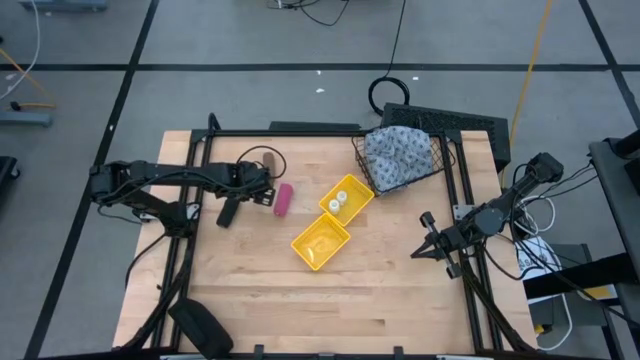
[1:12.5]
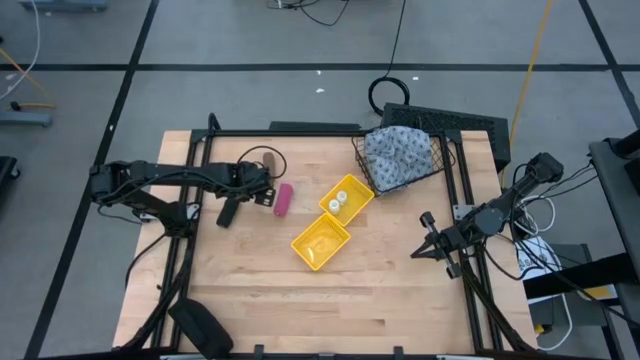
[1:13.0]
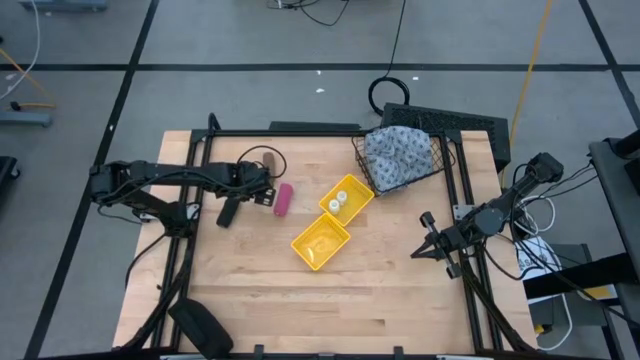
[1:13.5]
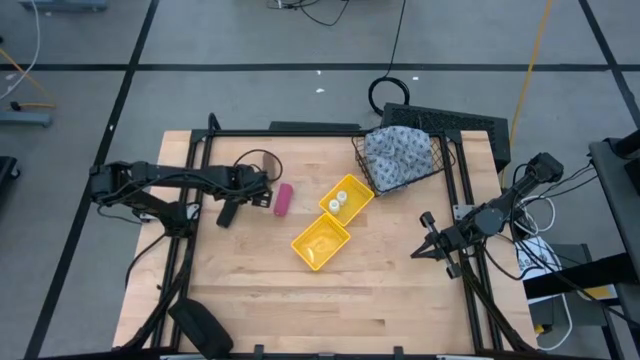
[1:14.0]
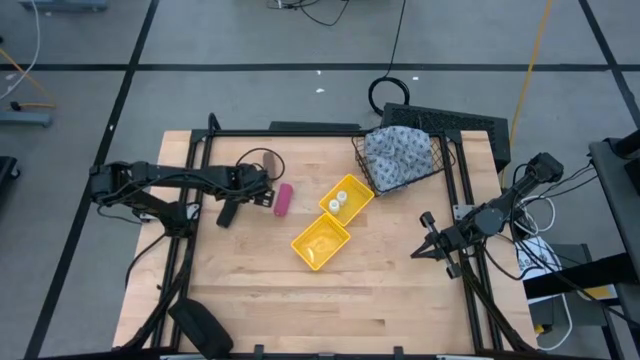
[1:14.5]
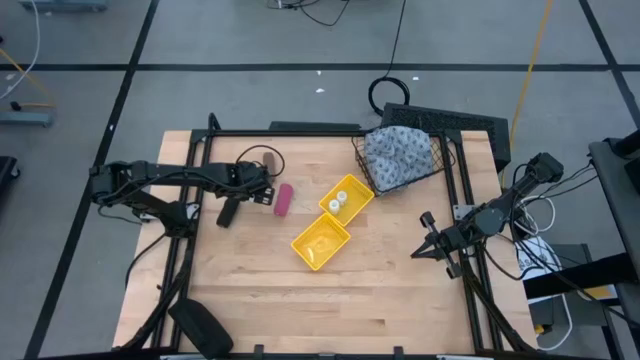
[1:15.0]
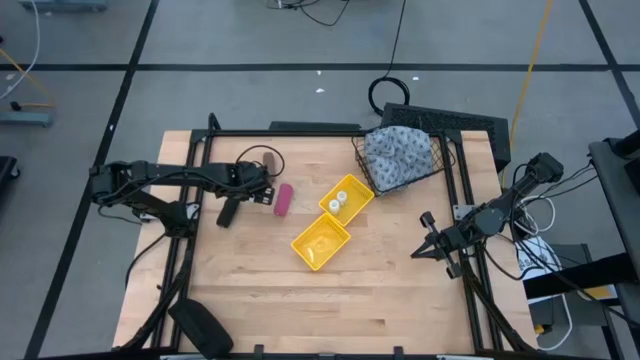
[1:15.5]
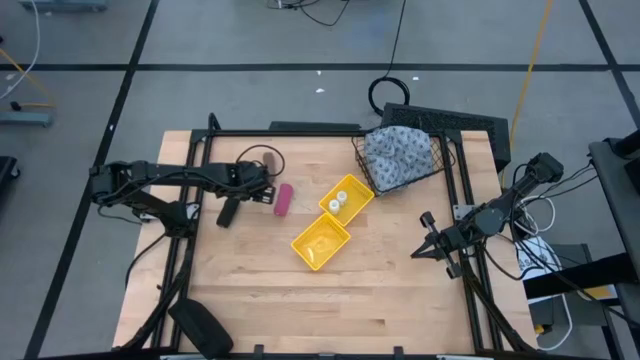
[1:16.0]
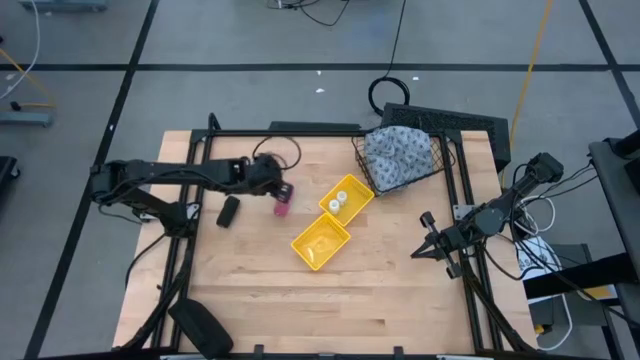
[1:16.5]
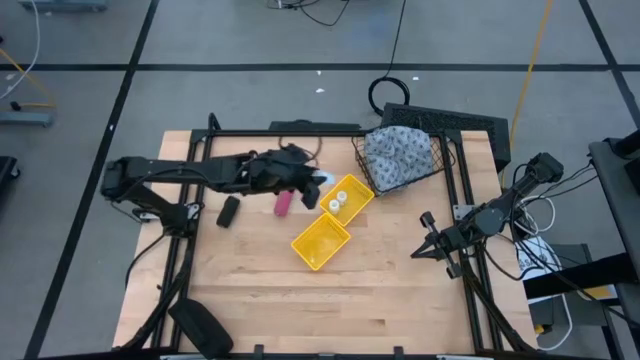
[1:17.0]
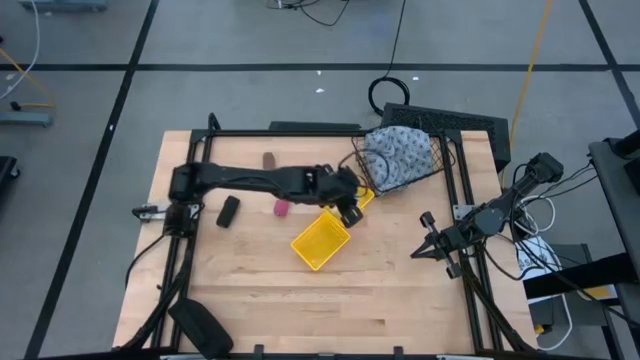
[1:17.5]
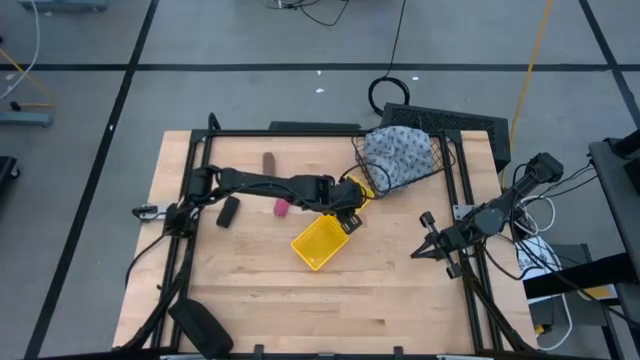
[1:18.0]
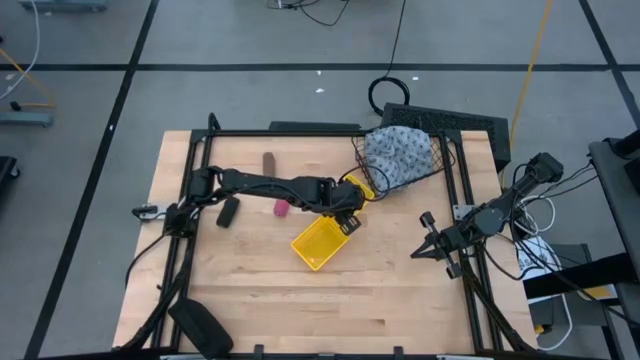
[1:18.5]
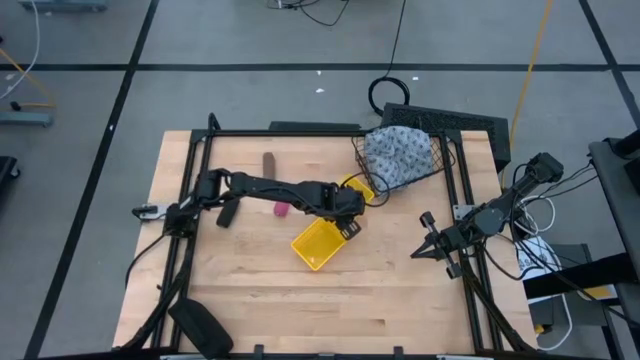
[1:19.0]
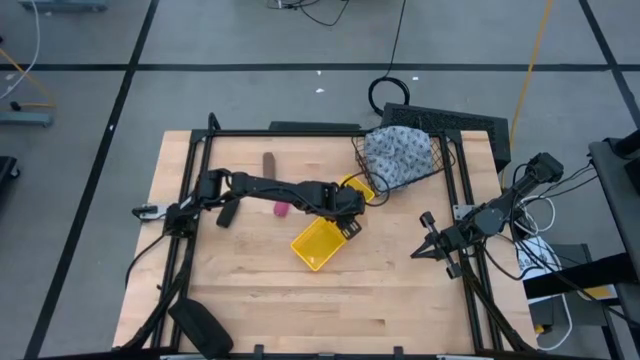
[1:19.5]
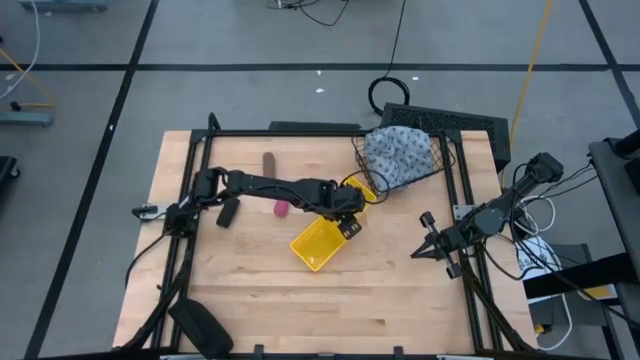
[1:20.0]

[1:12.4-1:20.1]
Task: Pick & place medical supplies in basket/bin
Put the white pill bottle into the top yellow basket

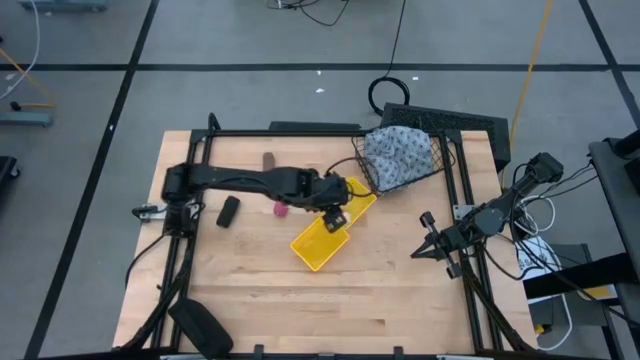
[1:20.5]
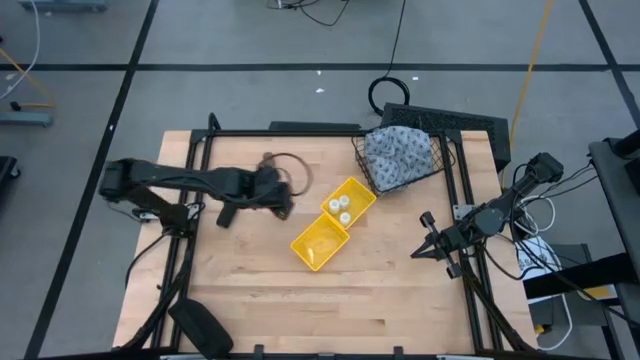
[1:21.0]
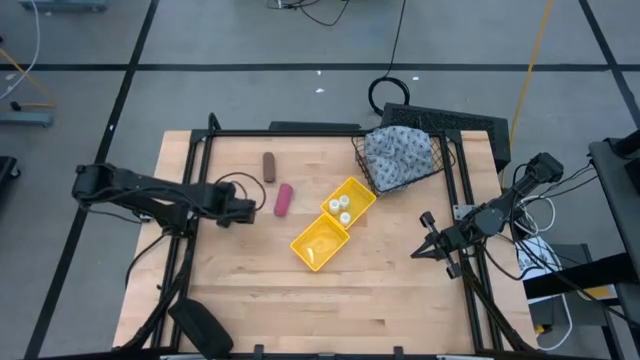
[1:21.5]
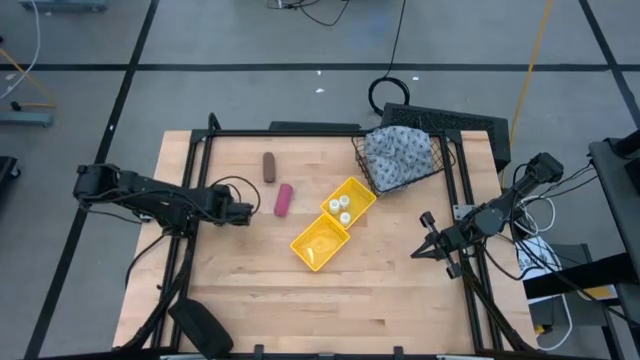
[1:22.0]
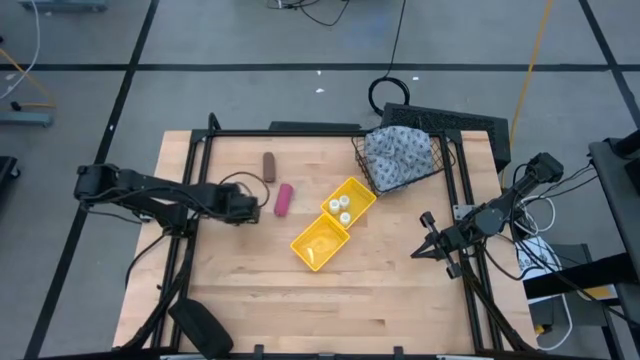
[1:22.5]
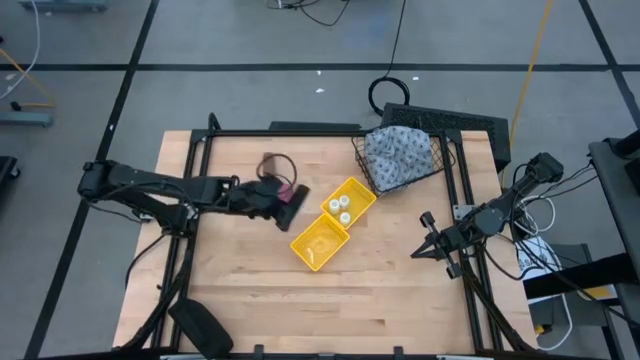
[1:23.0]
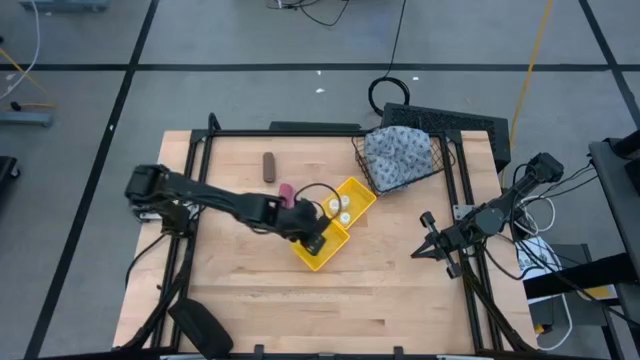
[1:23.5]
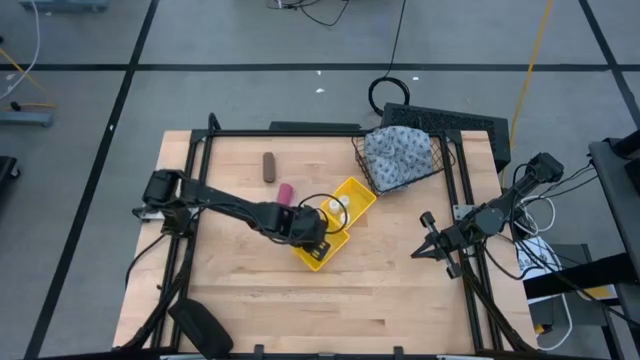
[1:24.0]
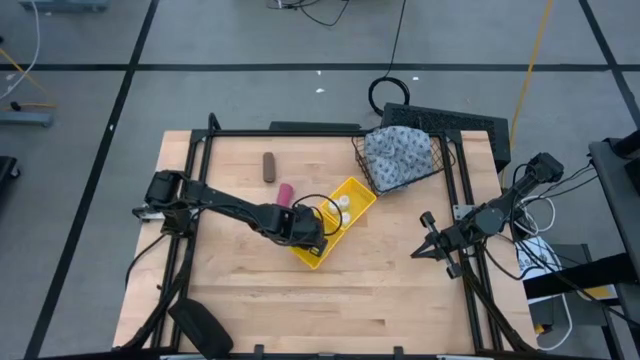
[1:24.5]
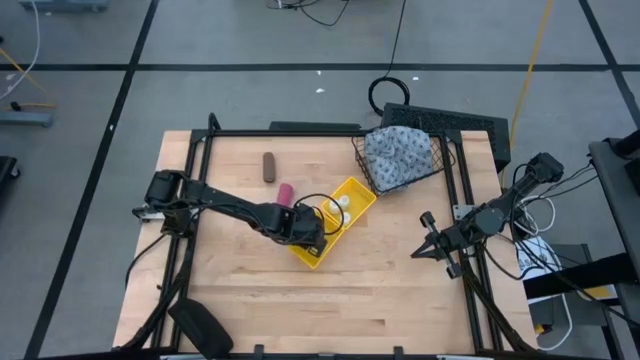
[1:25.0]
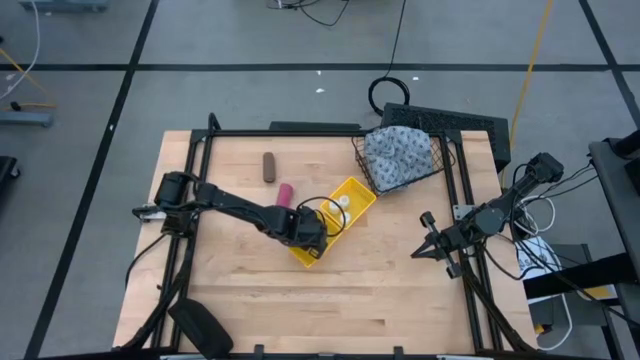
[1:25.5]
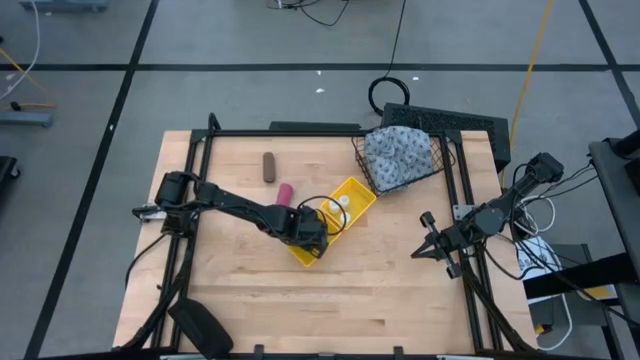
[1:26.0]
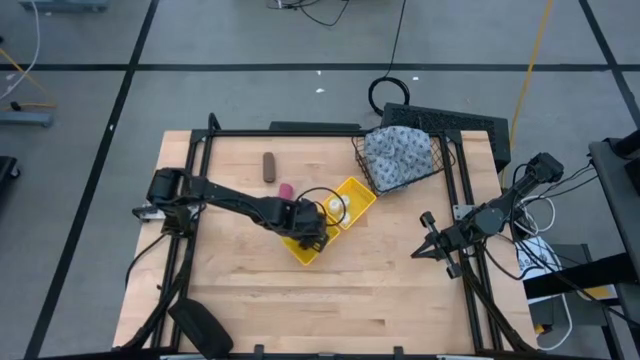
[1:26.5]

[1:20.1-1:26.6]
Put the black bandage into the bottom yellow basket

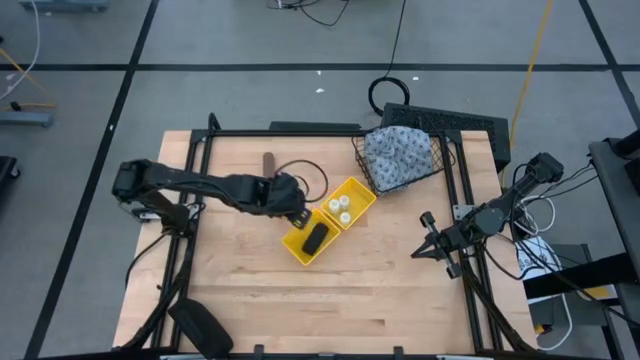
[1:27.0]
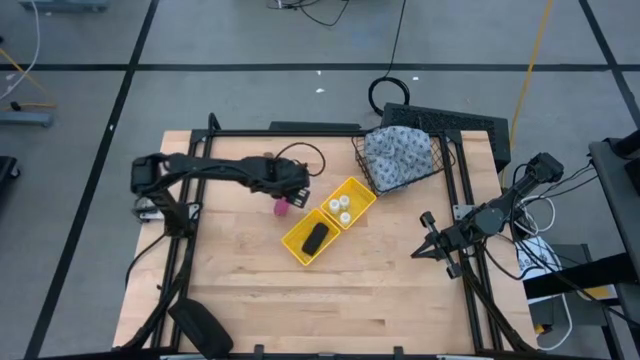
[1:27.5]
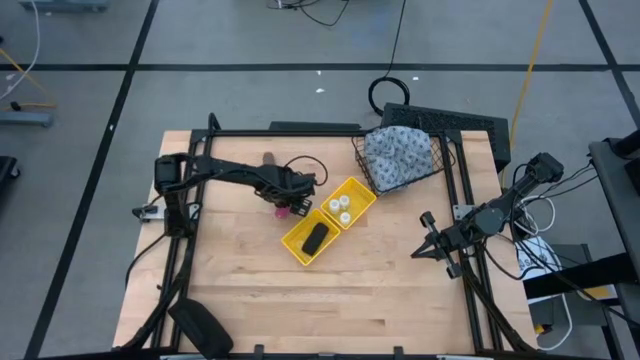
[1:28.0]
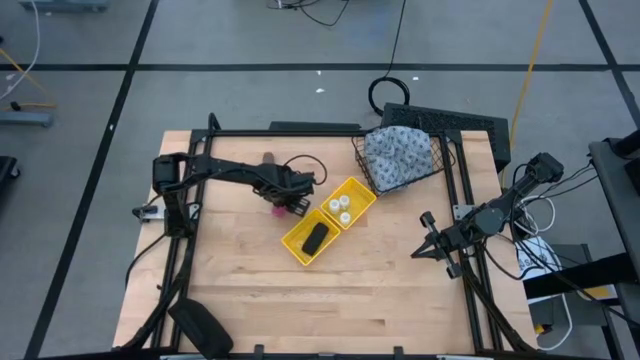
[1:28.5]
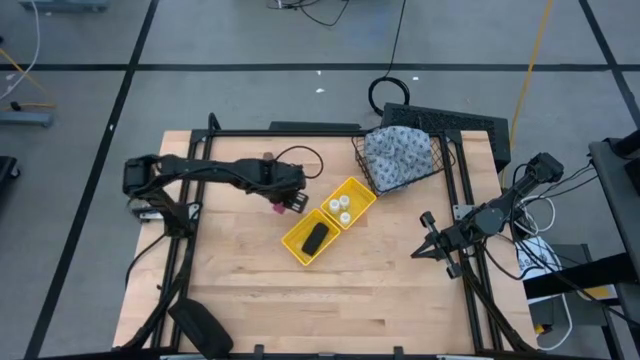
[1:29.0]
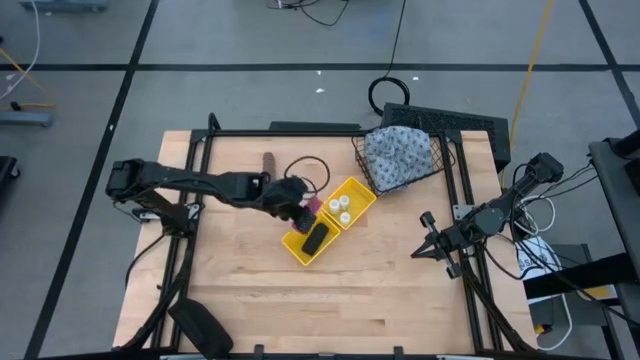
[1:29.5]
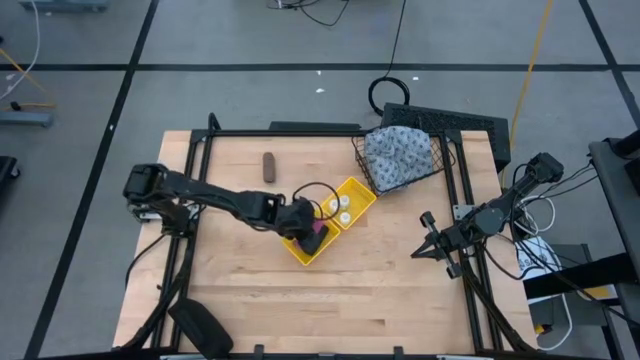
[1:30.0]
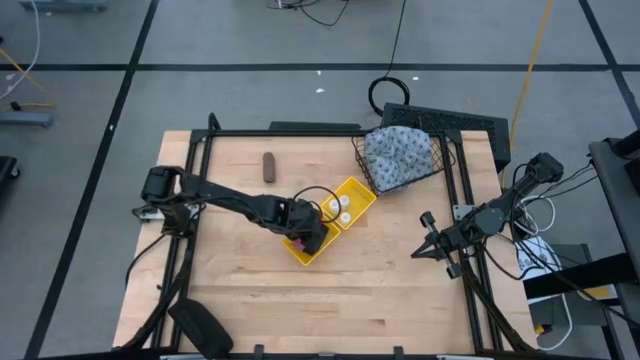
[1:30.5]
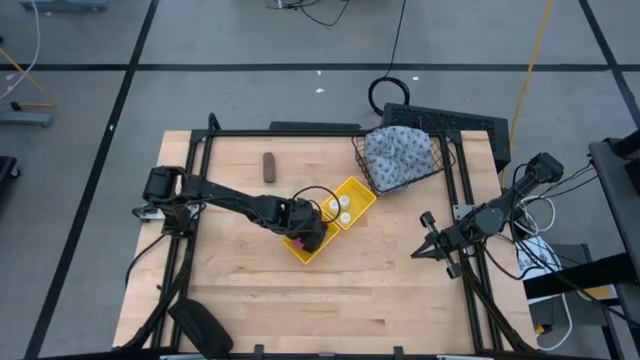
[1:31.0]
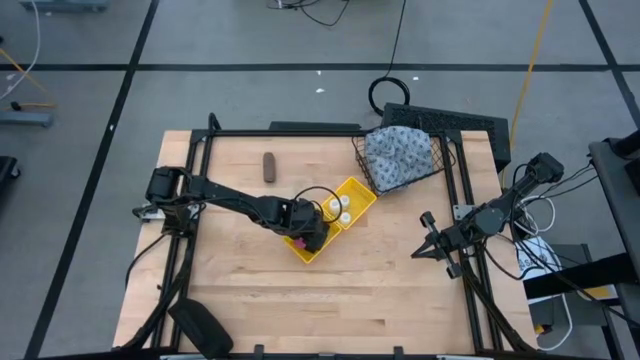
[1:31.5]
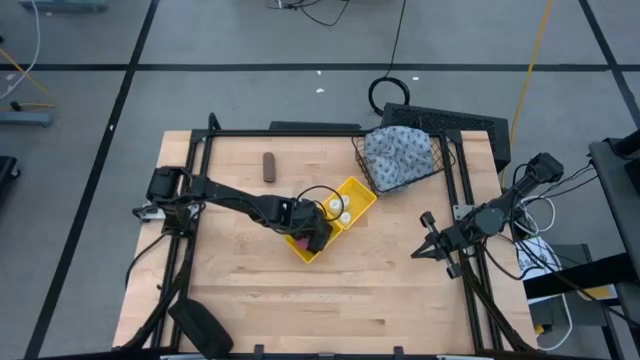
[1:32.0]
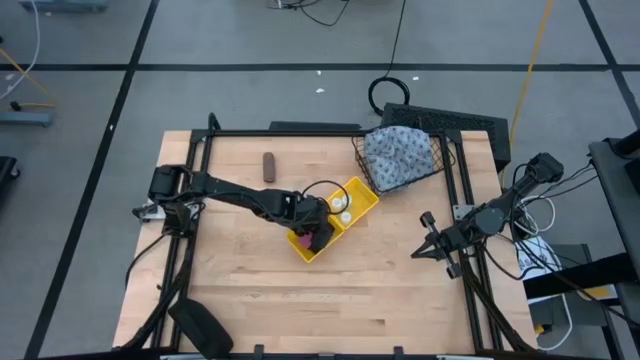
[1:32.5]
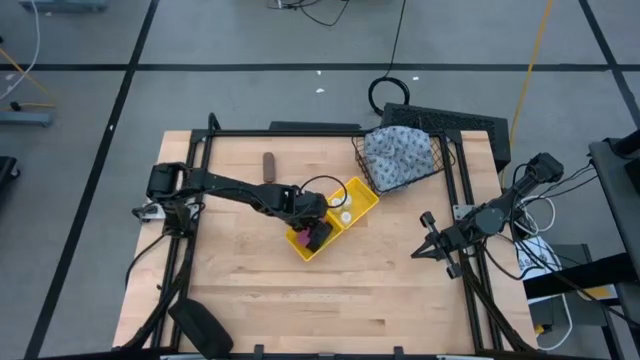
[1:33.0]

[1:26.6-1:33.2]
Put the pink bandage into the bottom yellow basket

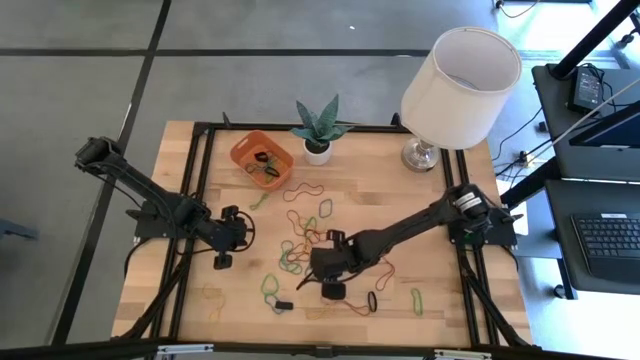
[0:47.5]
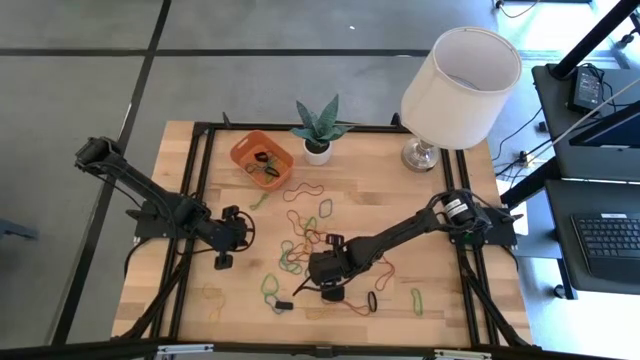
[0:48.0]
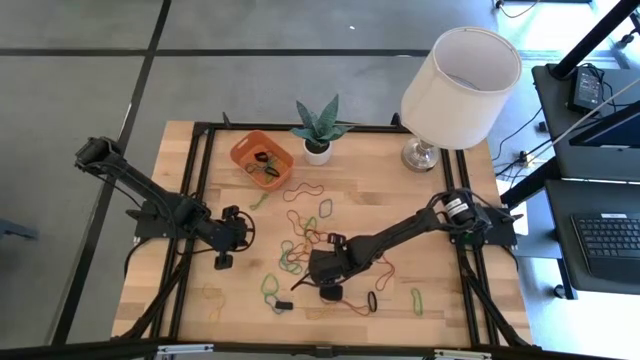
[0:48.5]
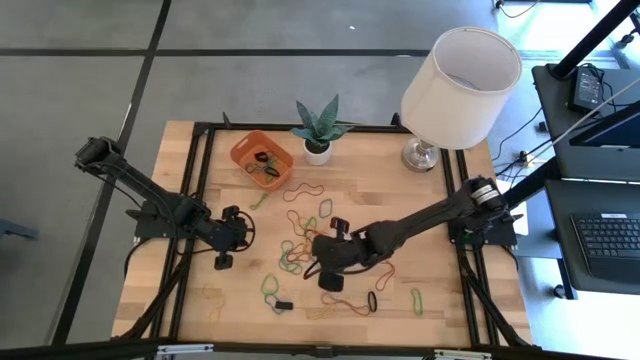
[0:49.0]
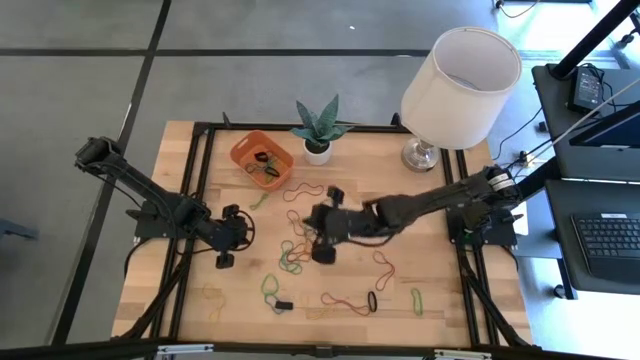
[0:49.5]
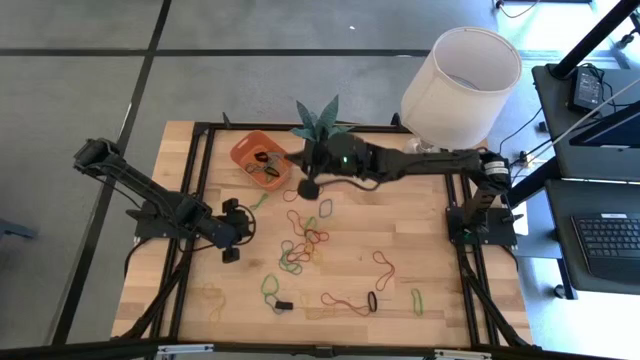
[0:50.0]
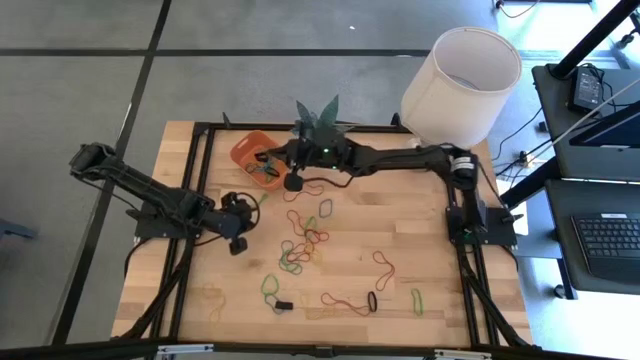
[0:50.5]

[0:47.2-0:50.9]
Task: Pick and place rubber bands into bin
Put the blue rubber band into the orange bin
